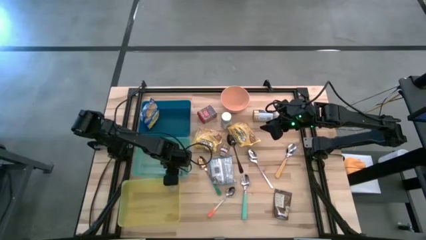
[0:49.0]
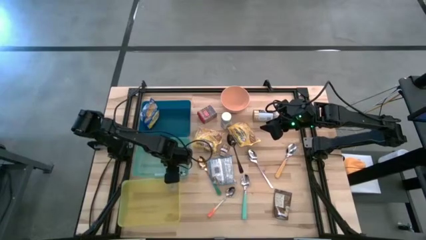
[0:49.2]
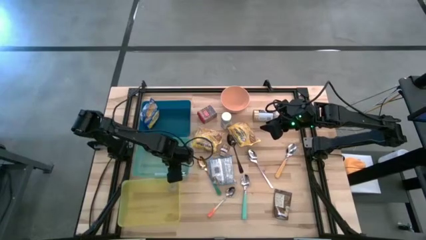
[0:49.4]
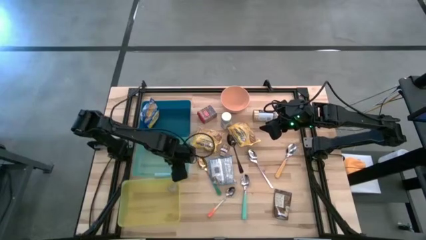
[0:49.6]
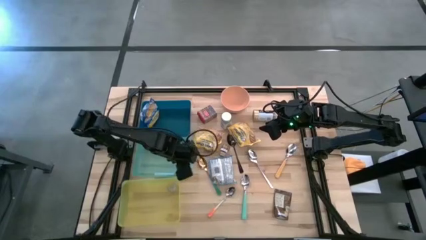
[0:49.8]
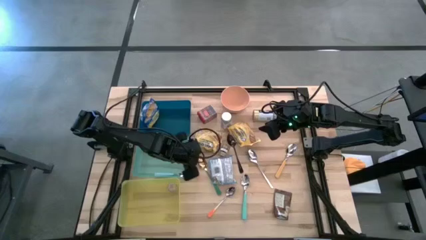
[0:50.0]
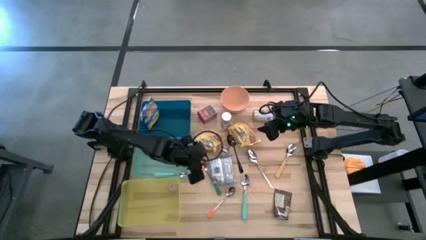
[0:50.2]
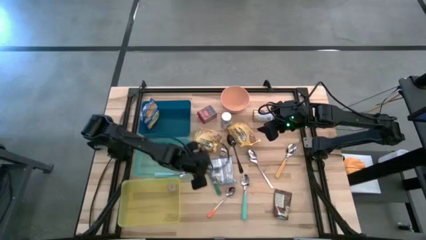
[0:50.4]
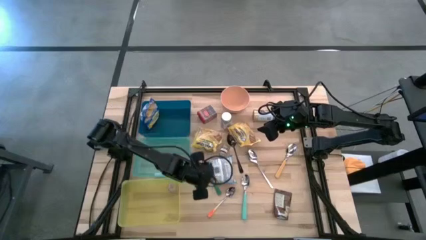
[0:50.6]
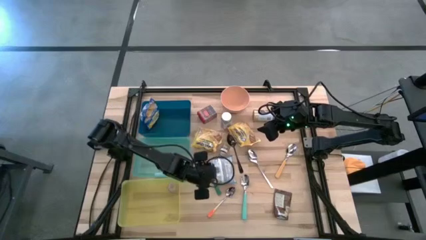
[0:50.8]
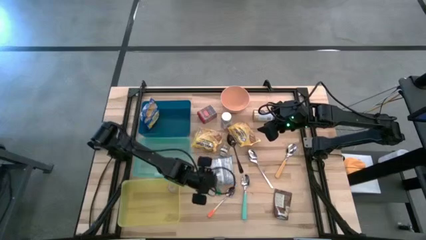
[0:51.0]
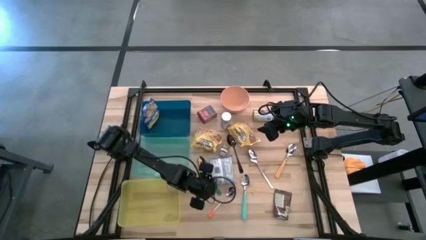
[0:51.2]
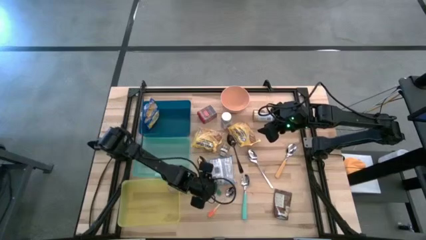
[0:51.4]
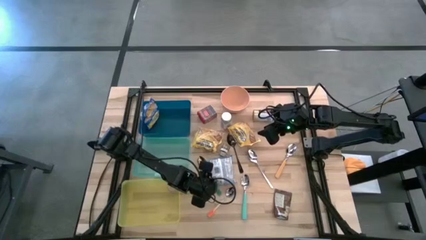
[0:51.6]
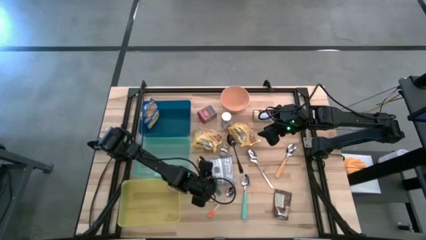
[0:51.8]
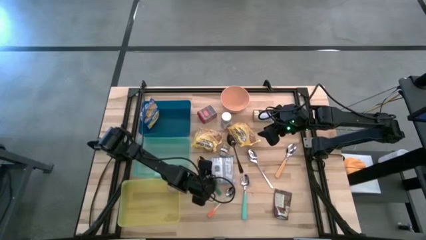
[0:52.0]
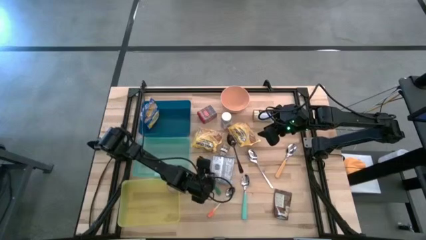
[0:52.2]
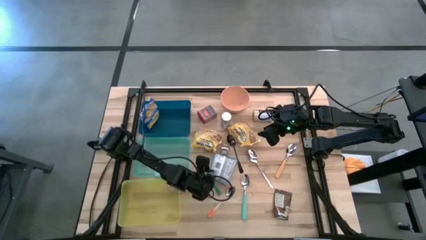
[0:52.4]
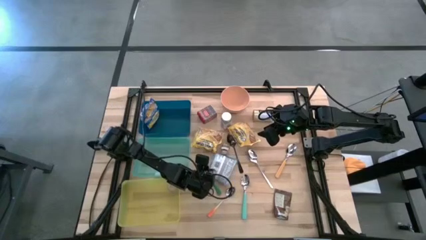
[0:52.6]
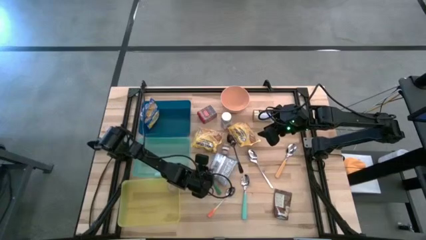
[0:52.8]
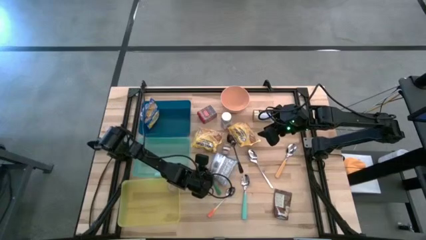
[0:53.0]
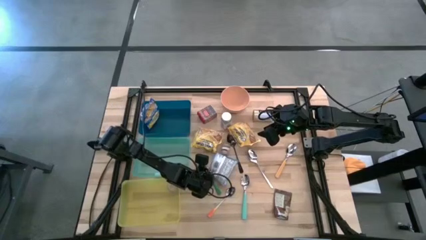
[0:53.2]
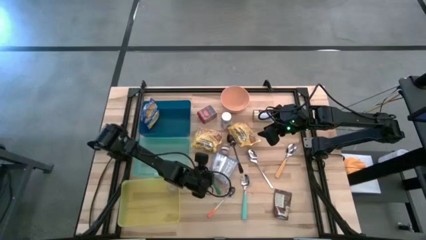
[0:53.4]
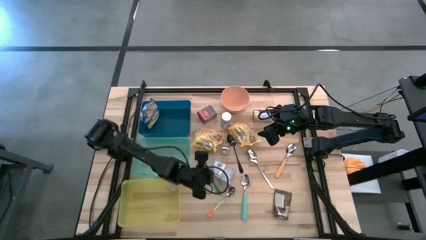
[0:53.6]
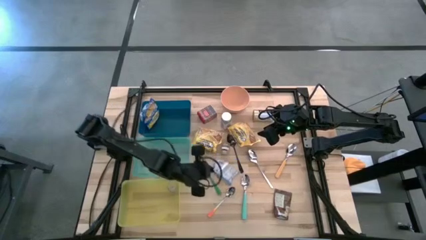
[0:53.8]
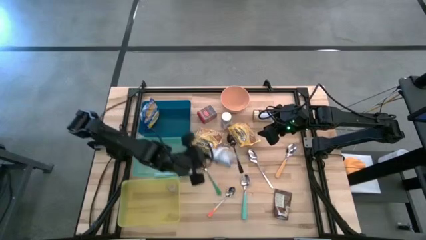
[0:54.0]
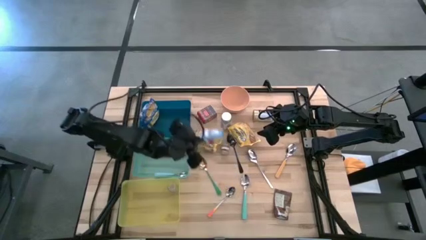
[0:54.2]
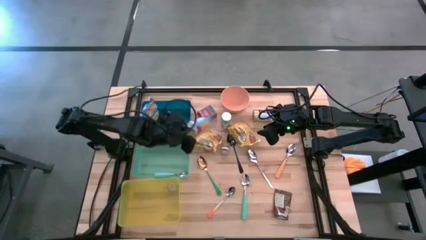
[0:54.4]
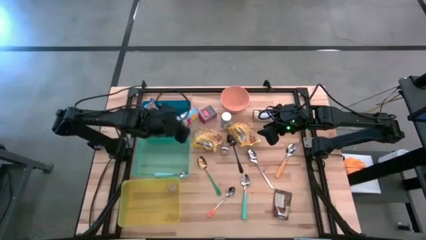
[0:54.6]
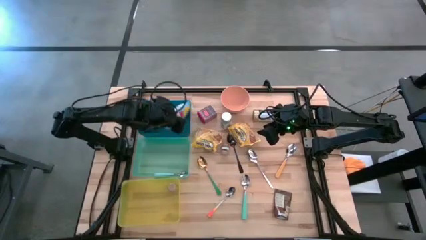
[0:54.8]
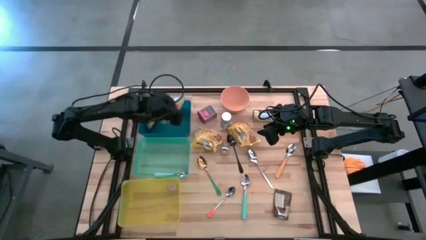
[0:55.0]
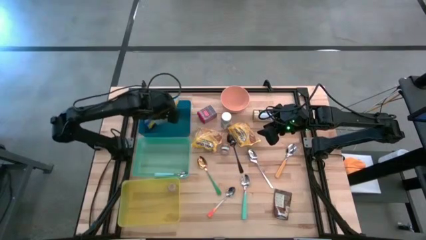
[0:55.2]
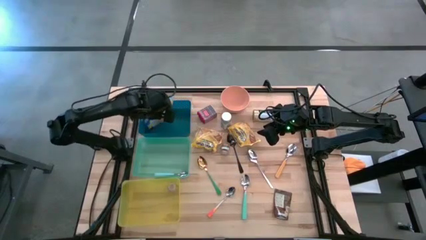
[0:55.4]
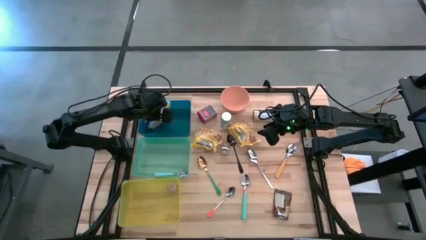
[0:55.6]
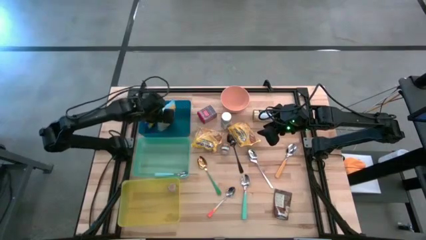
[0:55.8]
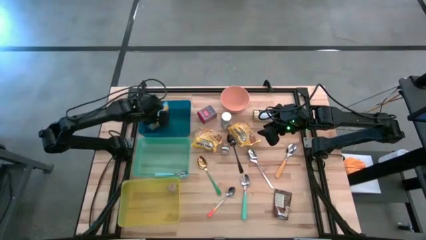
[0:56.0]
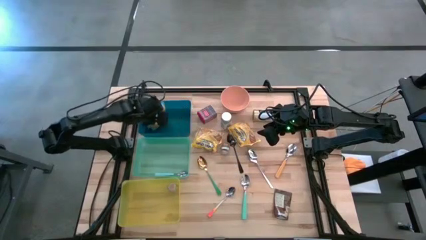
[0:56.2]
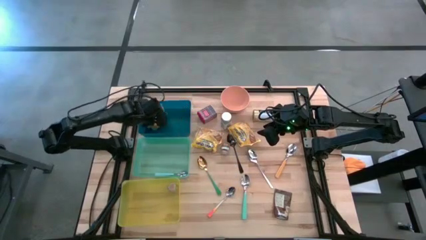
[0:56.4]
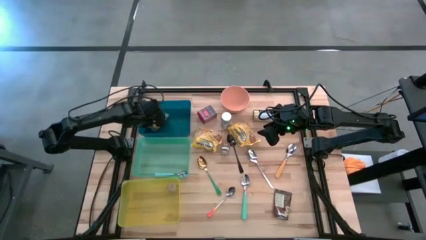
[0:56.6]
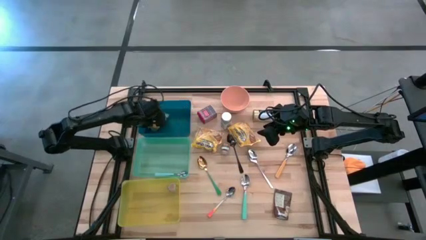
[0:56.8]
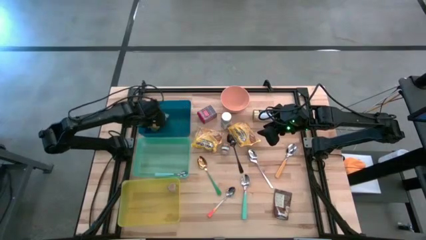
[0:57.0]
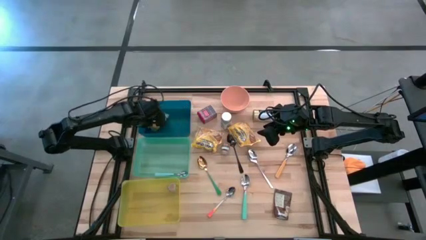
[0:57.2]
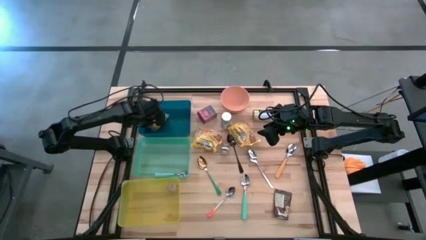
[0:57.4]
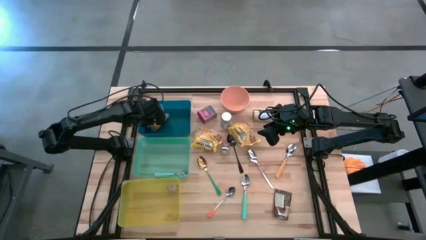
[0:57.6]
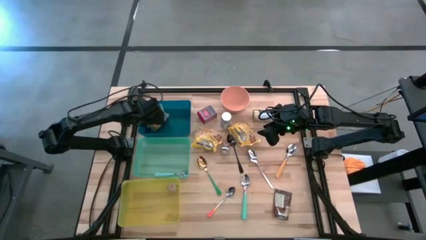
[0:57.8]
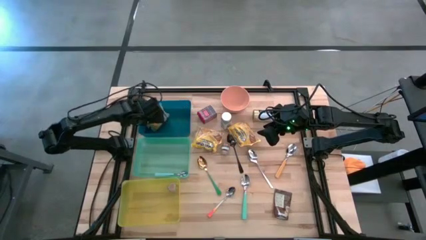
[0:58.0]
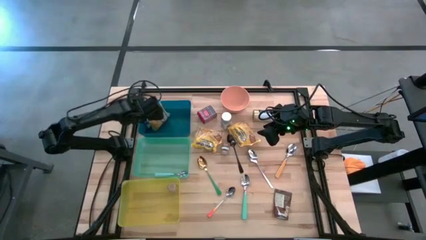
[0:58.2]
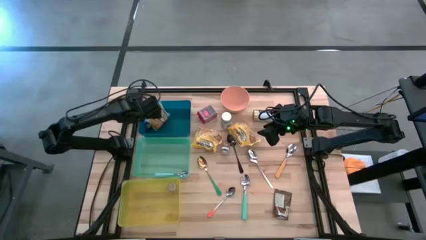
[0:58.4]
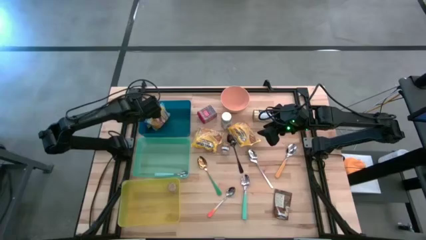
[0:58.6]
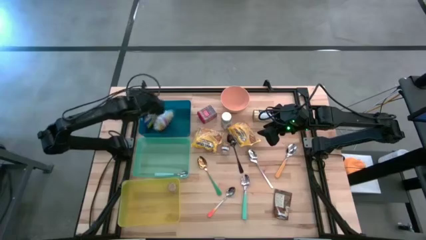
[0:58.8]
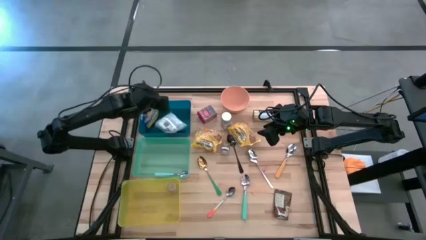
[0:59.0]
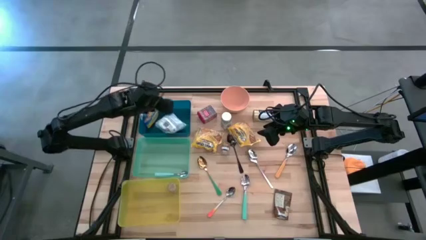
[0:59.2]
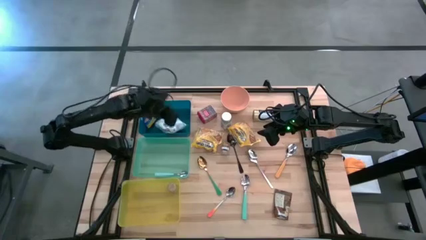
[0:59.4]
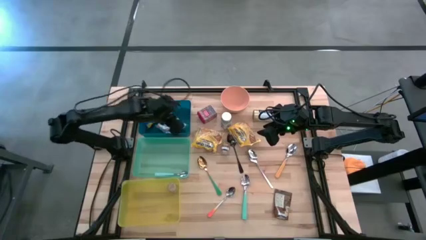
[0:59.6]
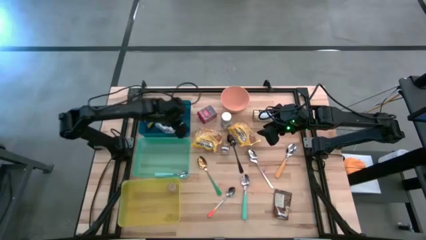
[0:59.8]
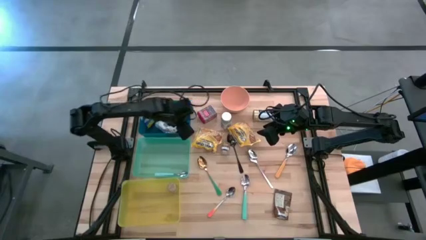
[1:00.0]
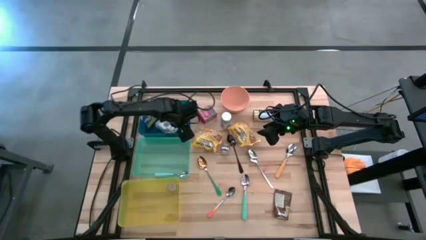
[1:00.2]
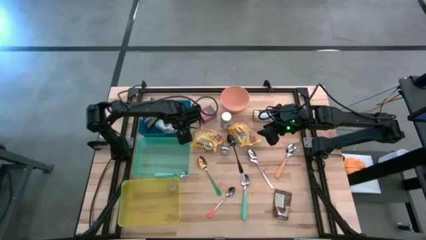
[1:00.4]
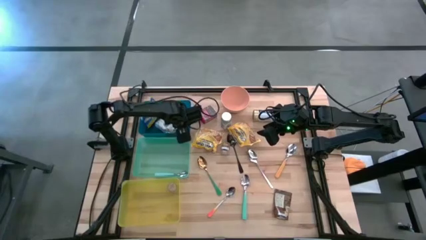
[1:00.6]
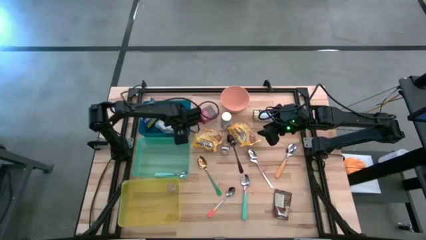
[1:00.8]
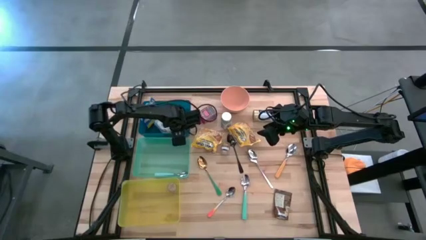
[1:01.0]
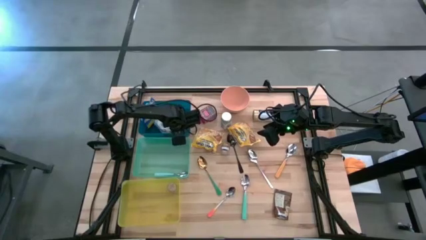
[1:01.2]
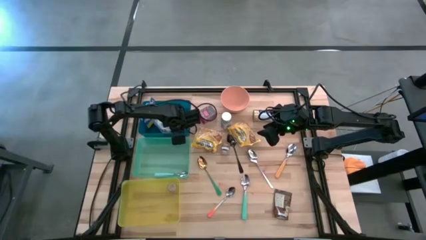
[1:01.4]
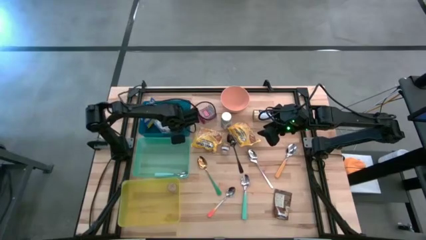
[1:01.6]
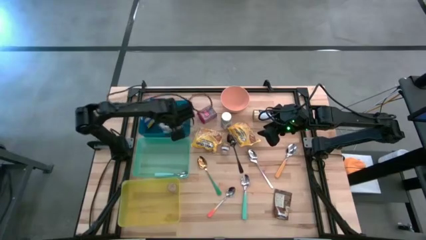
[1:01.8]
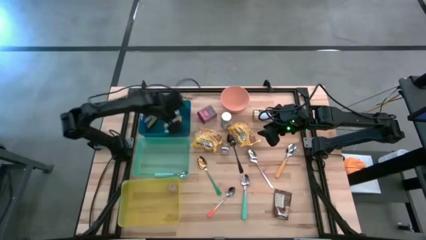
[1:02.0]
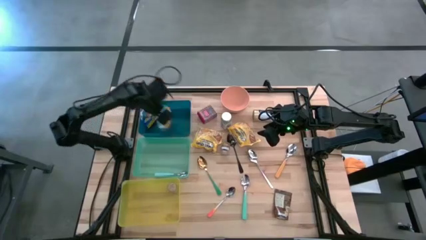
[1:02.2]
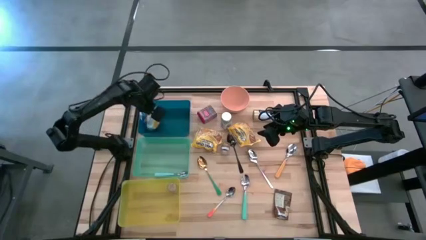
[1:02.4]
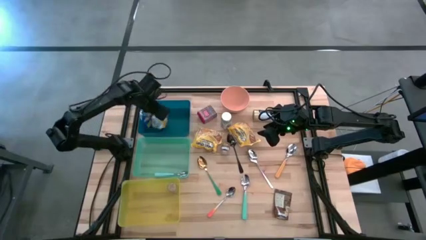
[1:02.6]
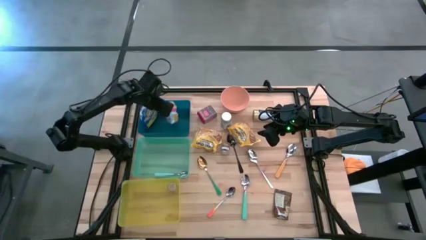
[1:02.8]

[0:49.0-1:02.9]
Put the blue noodles packet into the blue bin
